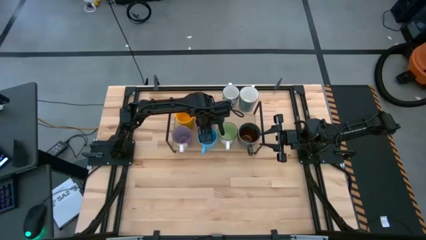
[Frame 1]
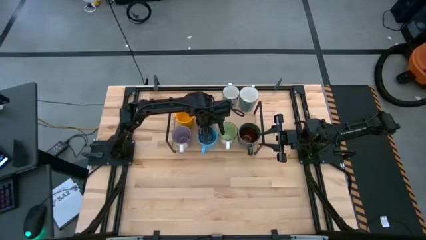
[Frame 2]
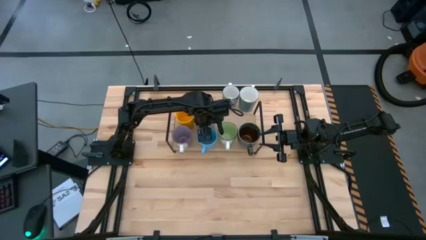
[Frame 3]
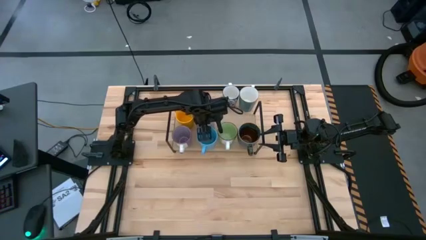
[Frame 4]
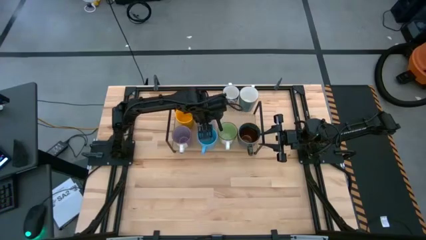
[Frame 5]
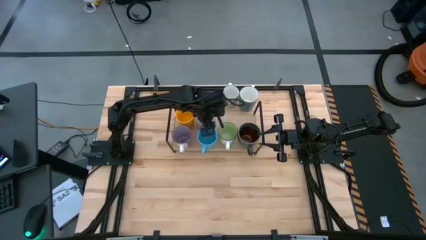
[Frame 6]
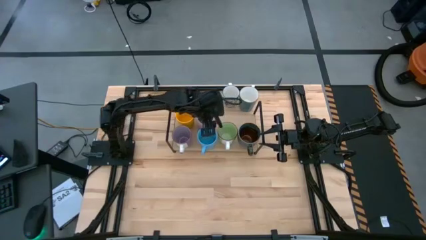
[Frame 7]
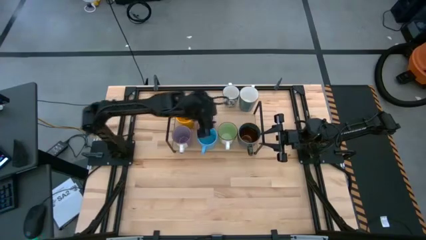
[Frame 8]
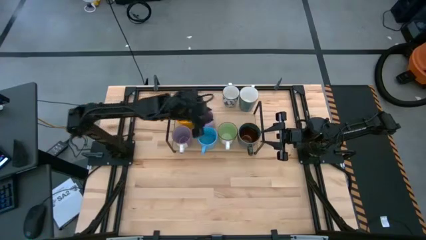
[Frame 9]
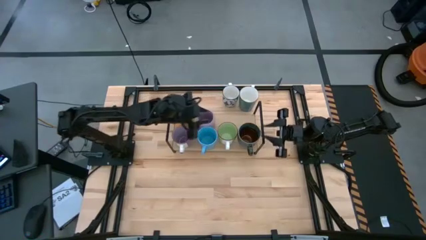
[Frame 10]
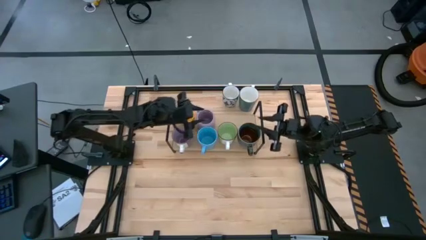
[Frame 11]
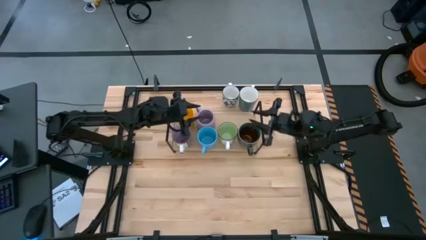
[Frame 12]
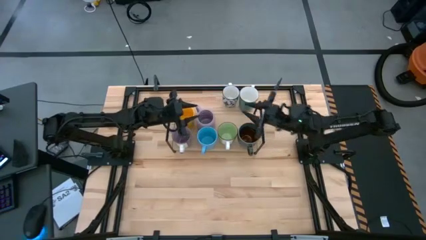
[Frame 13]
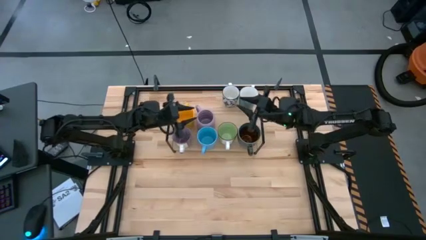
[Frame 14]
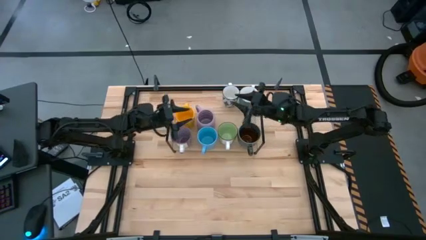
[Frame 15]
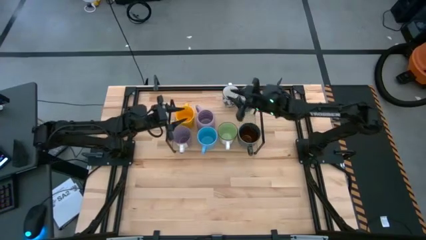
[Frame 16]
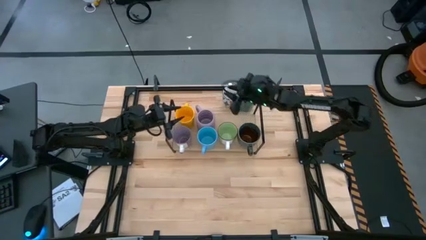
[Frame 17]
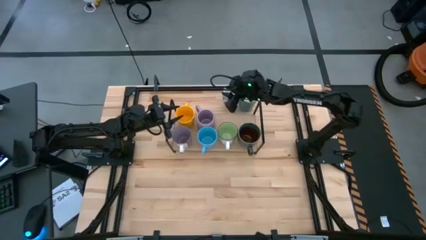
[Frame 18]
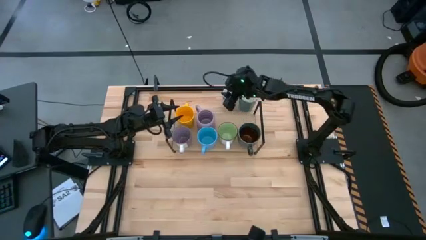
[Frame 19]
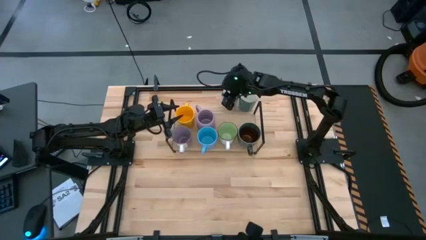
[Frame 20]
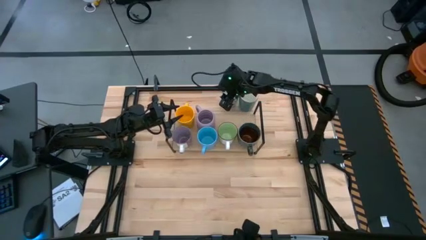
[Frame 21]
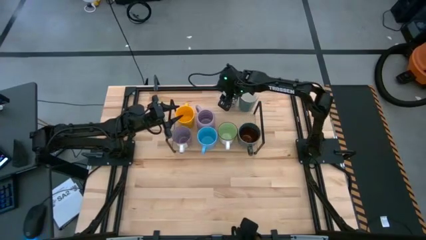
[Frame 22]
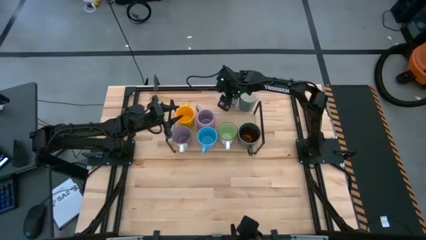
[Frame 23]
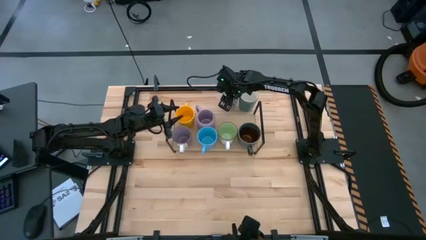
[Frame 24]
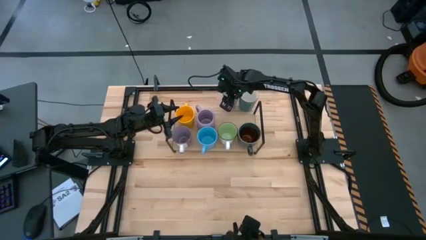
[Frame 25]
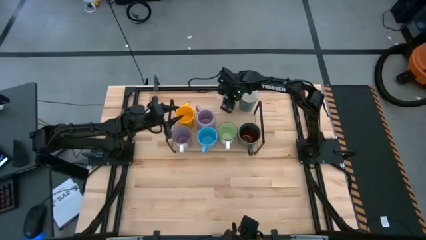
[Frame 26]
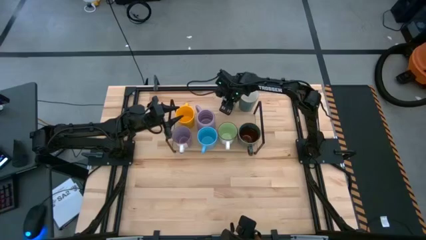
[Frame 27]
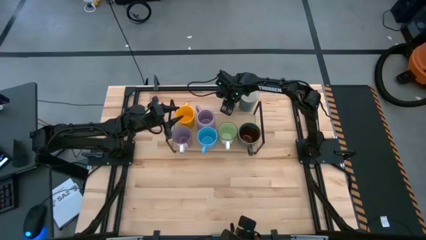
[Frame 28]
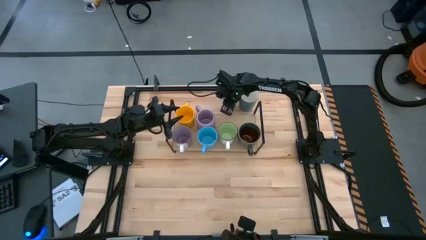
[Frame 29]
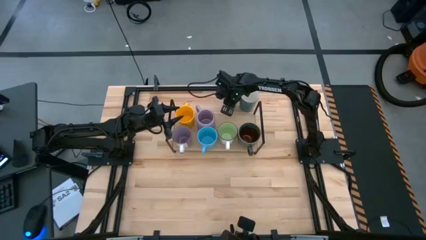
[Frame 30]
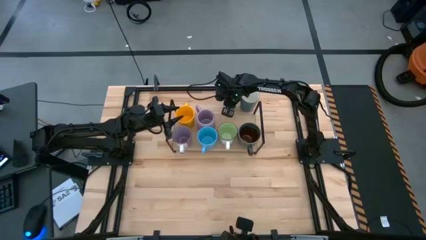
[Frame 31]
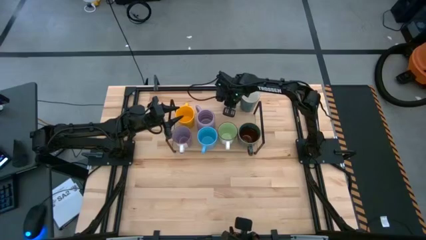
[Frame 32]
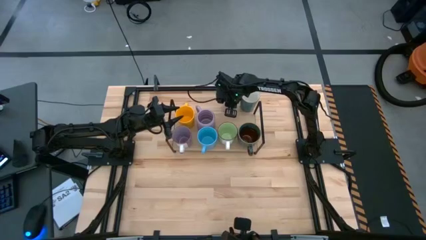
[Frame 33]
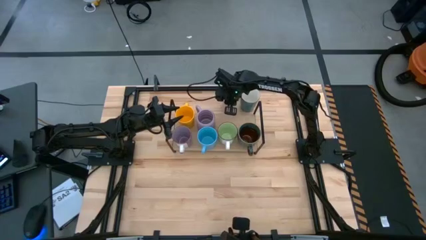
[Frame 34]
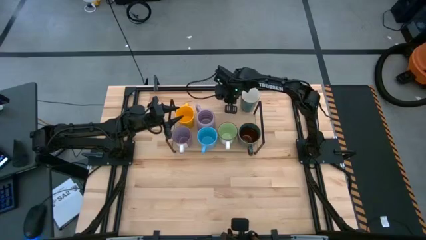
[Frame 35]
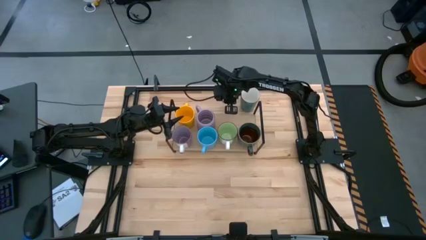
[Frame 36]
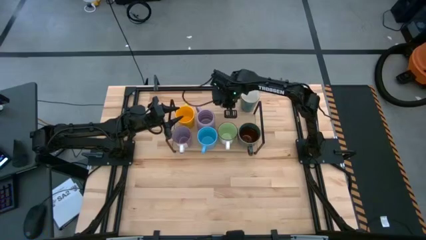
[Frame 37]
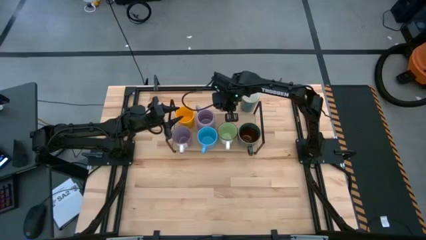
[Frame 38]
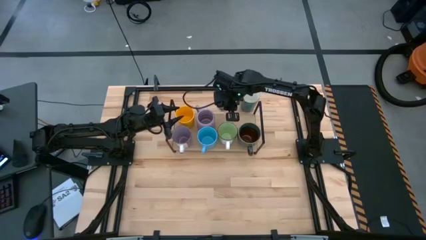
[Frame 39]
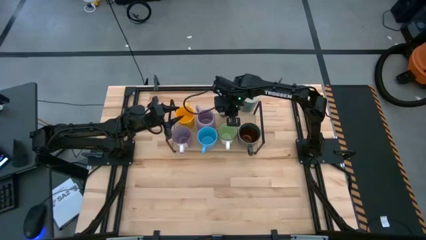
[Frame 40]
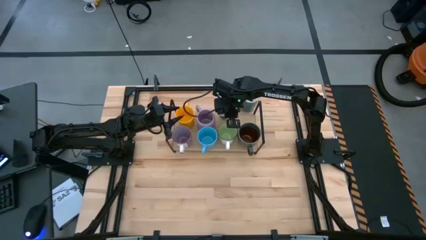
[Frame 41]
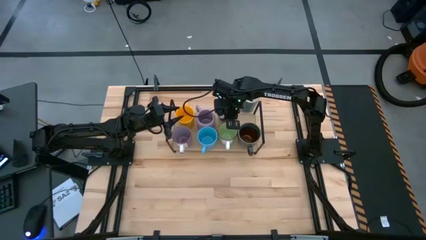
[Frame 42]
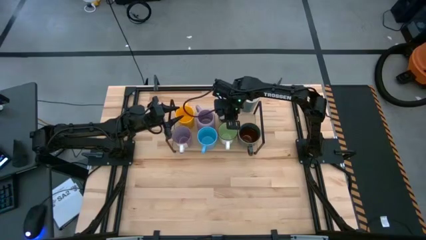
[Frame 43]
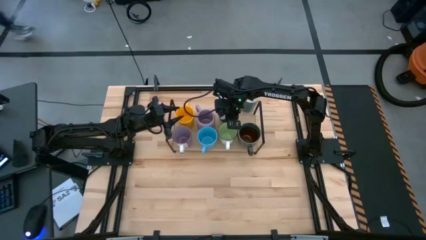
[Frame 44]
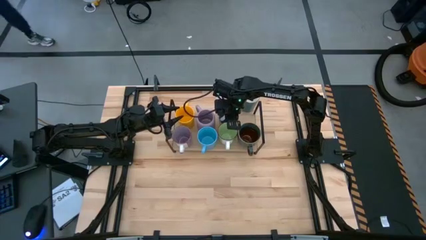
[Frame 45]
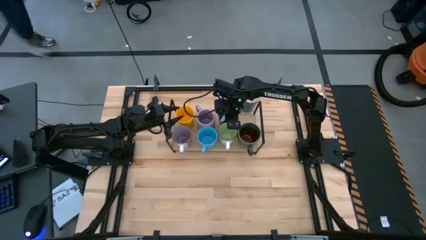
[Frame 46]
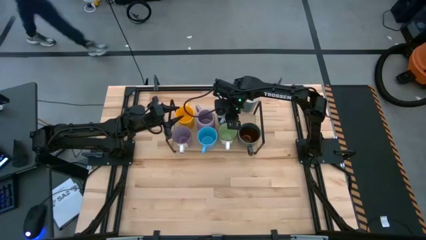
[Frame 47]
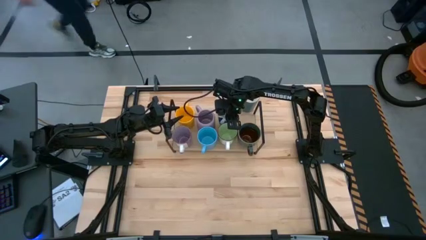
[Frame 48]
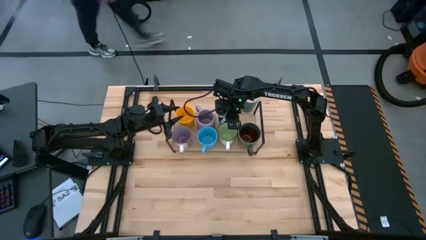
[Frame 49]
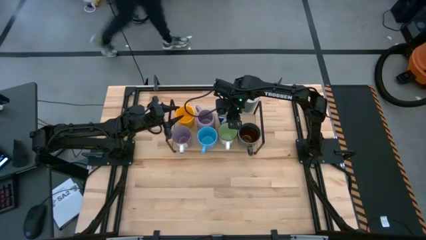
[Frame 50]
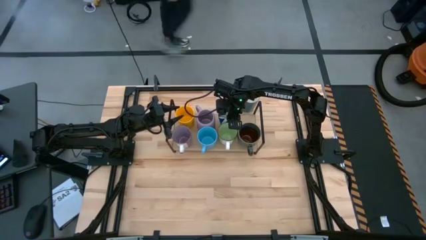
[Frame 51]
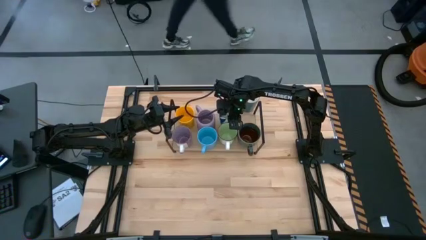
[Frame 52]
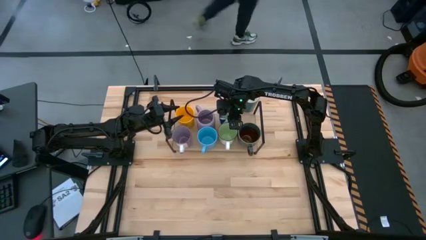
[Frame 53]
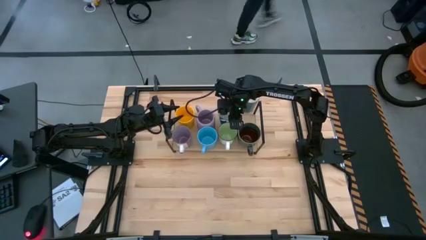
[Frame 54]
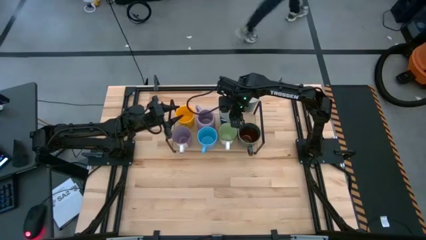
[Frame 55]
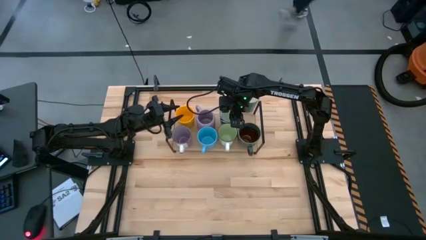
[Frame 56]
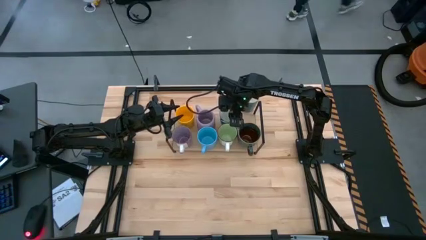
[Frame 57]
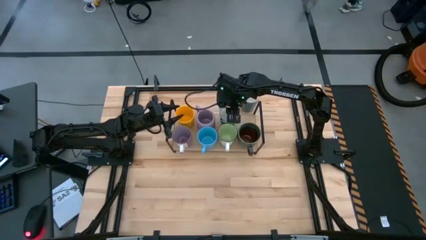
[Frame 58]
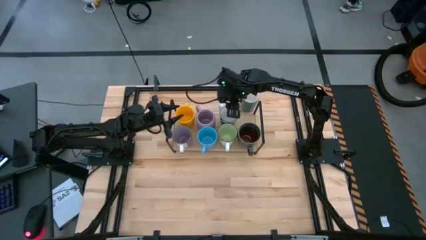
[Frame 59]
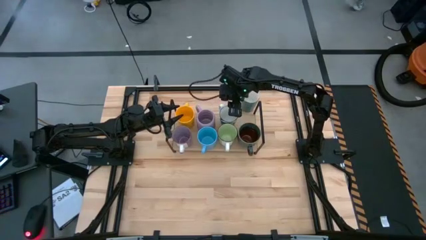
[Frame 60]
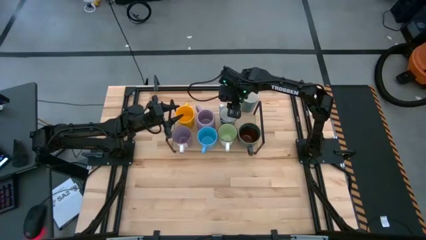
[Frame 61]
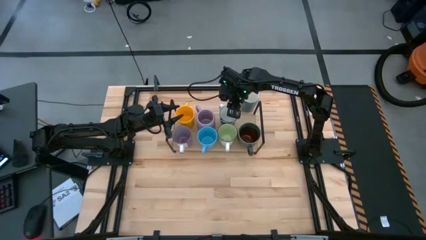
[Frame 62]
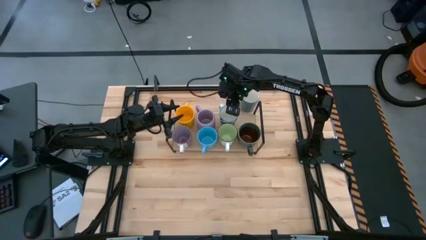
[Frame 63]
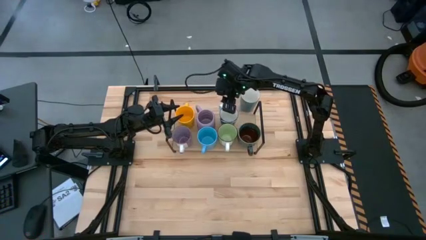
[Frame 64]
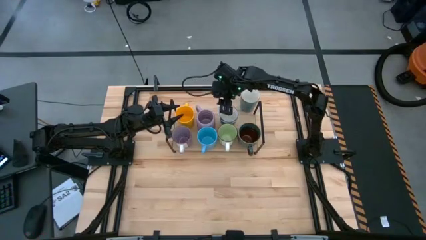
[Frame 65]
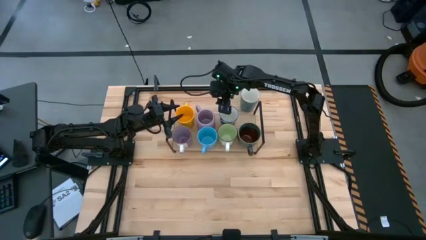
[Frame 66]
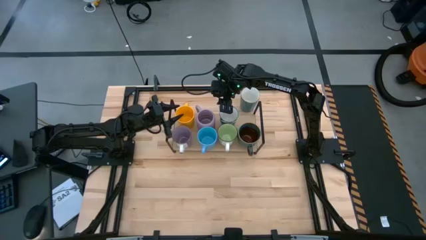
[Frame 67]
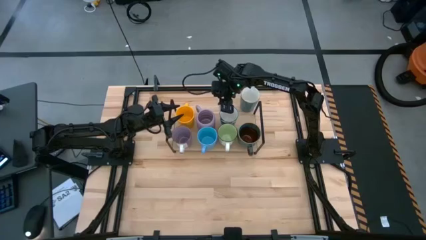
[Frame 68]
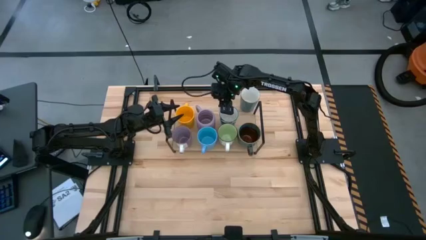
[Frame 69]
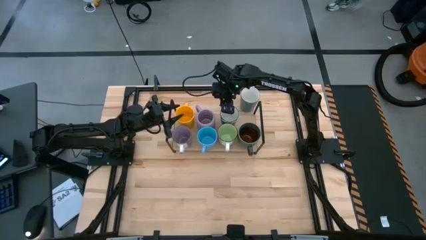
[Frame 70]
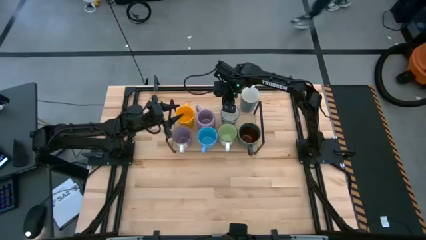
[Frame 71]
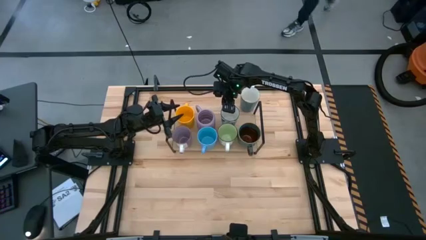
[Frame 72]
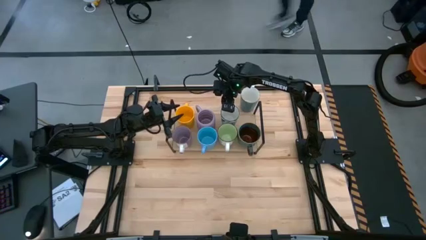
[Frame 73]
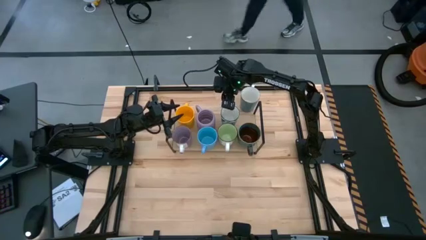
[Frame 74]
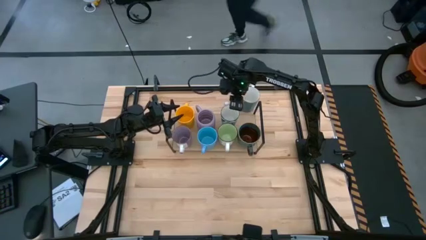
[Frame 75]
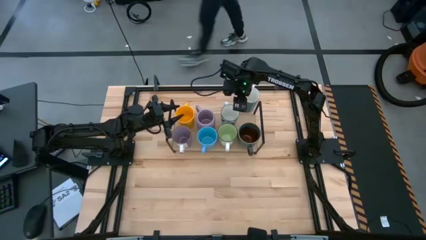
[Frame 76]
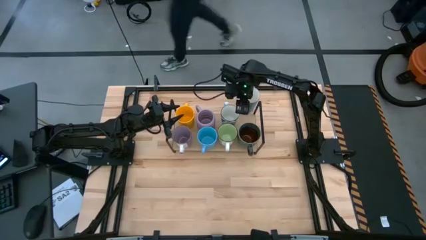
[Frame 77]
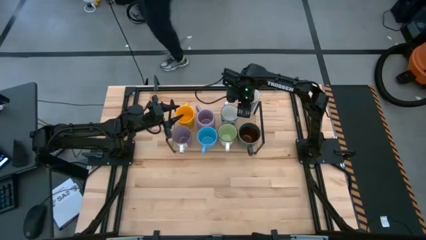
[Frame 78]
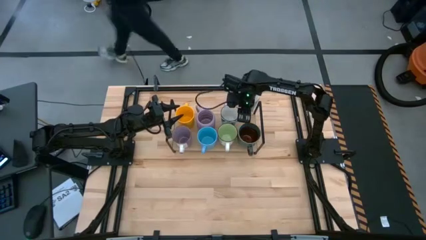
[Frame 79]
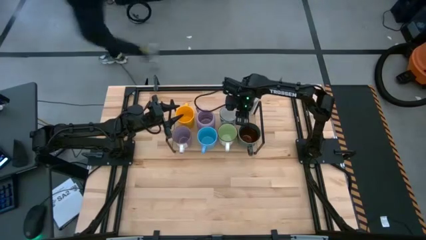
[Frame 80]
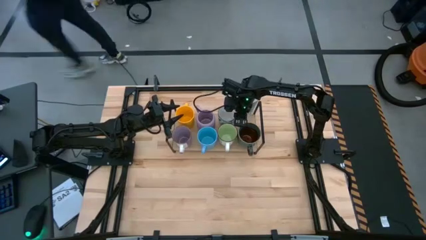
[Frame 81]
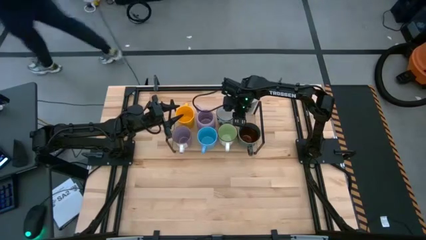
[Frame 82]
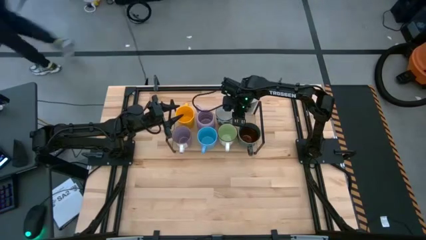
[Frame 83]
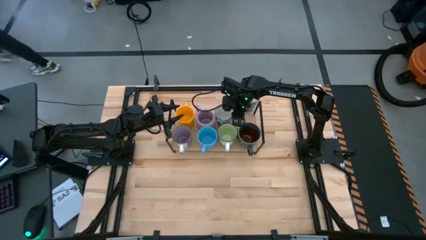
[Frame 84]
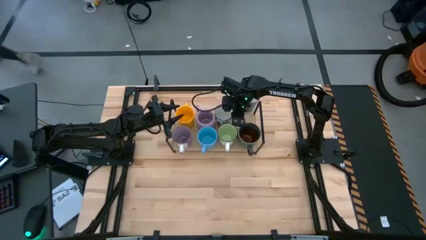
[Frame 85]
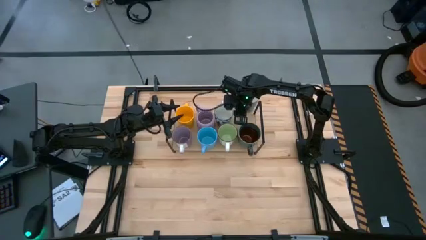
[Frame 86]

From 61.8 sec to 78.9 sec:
Task: Place coffee mugs
Put the blue pattern mug on the shelf
